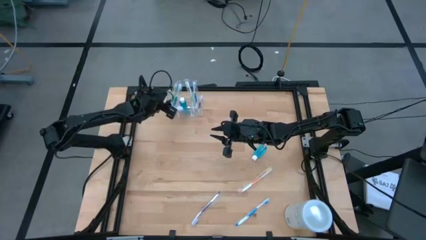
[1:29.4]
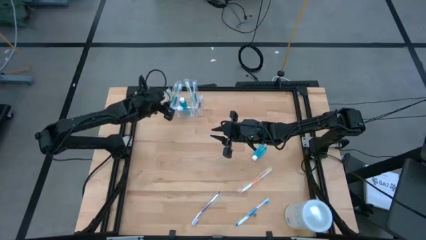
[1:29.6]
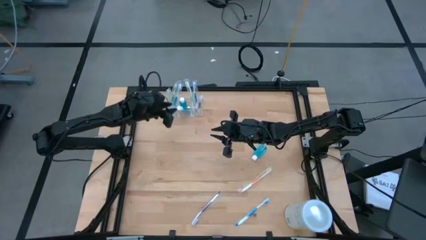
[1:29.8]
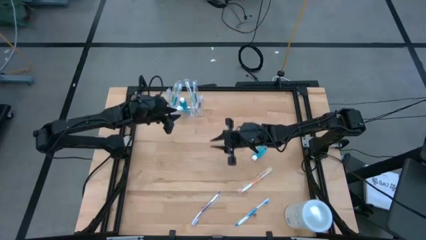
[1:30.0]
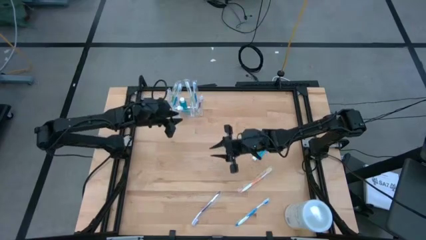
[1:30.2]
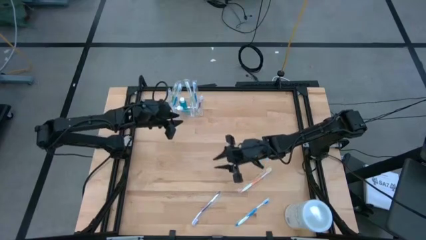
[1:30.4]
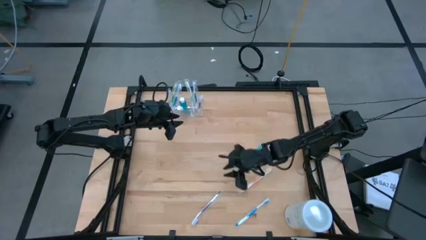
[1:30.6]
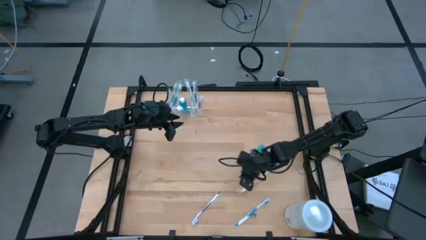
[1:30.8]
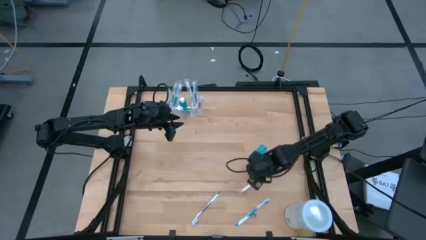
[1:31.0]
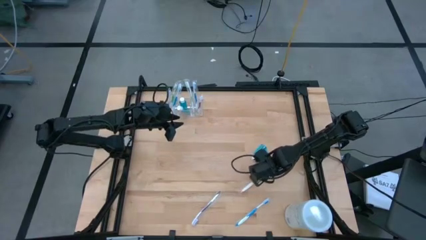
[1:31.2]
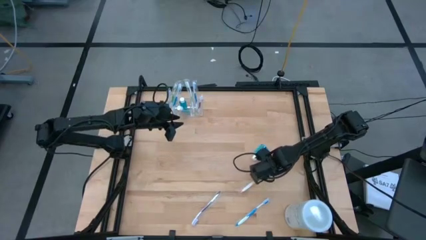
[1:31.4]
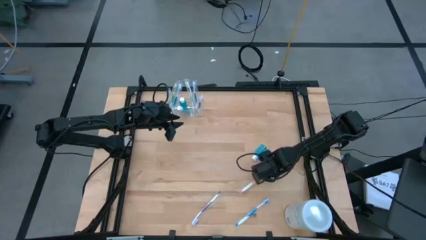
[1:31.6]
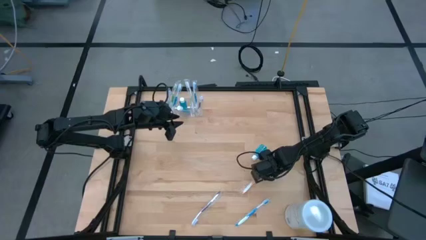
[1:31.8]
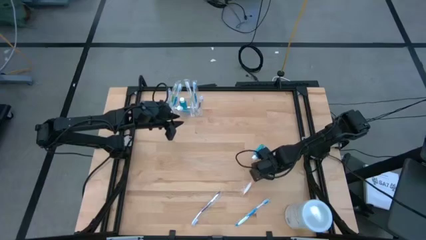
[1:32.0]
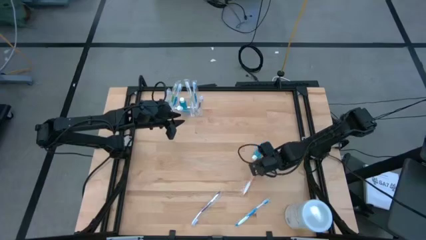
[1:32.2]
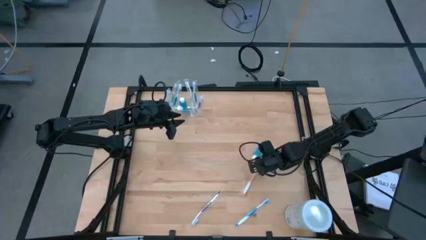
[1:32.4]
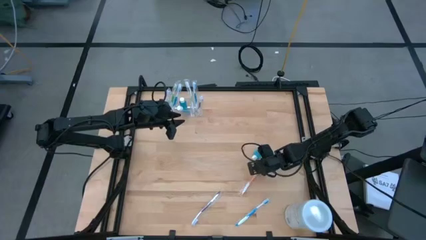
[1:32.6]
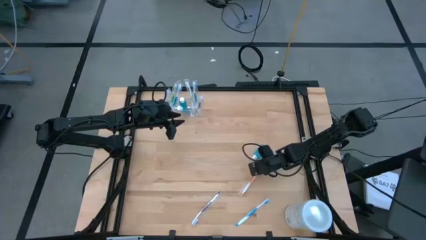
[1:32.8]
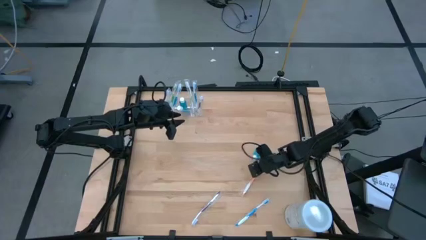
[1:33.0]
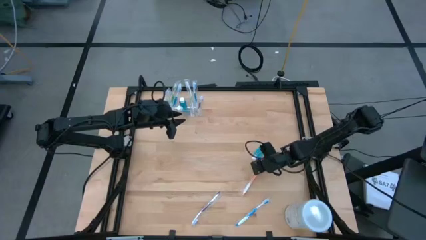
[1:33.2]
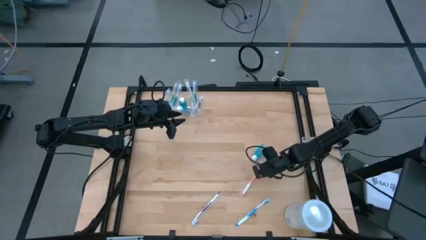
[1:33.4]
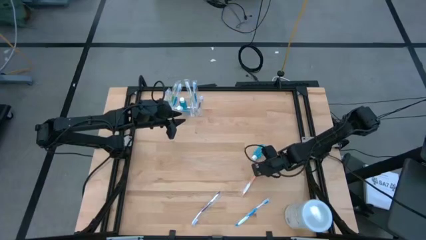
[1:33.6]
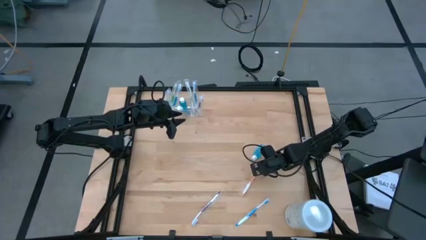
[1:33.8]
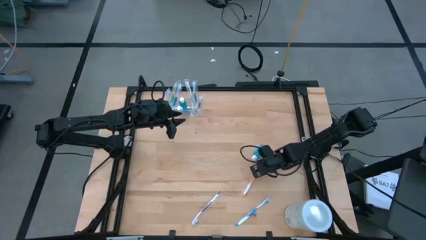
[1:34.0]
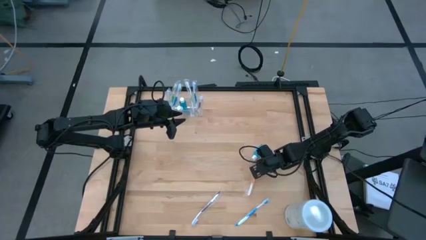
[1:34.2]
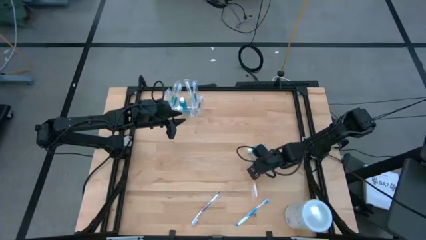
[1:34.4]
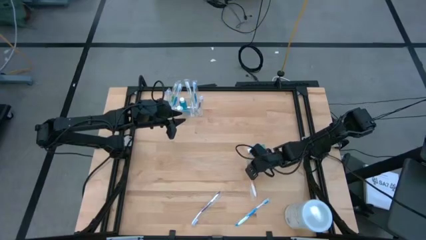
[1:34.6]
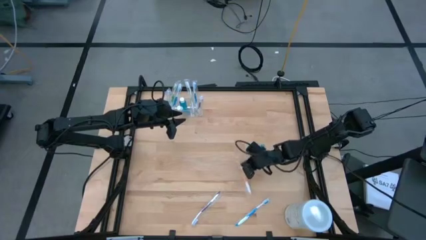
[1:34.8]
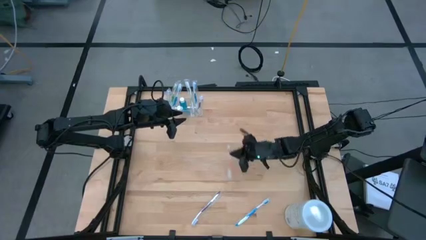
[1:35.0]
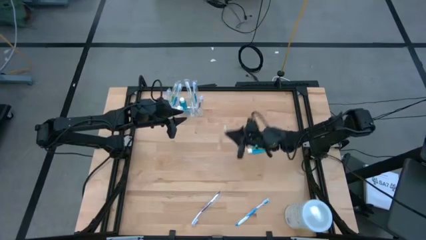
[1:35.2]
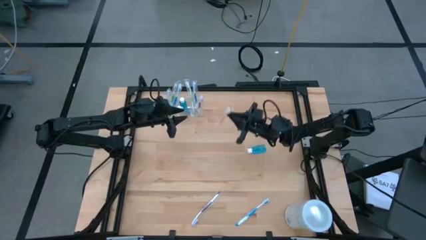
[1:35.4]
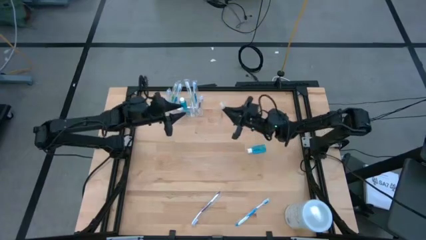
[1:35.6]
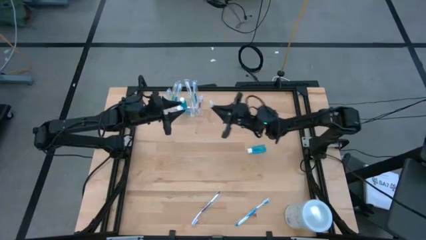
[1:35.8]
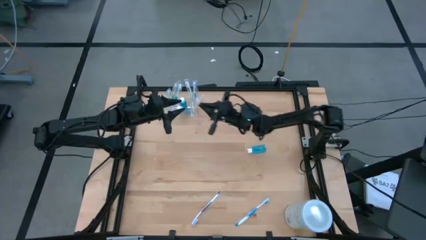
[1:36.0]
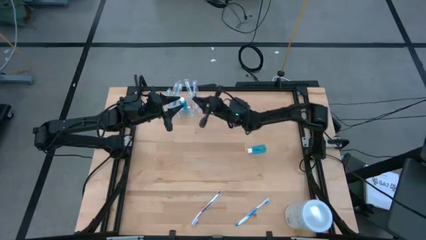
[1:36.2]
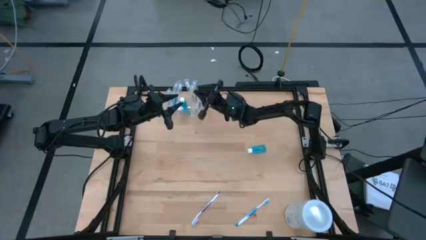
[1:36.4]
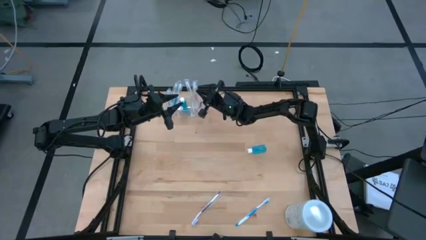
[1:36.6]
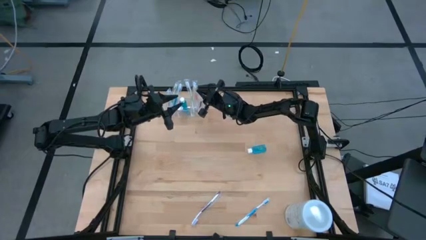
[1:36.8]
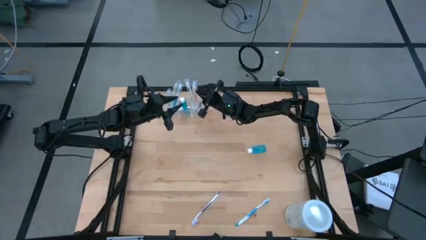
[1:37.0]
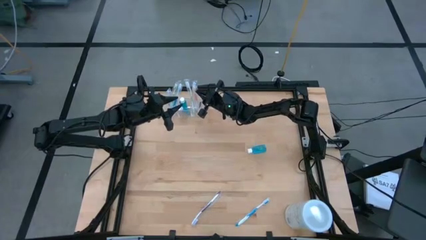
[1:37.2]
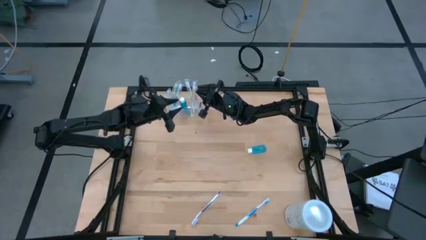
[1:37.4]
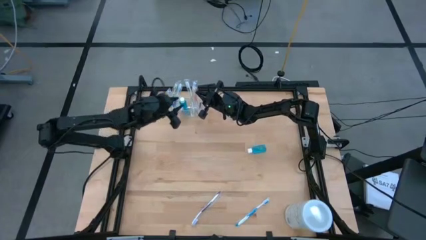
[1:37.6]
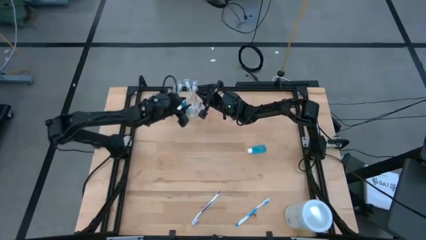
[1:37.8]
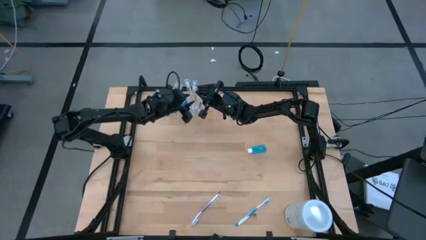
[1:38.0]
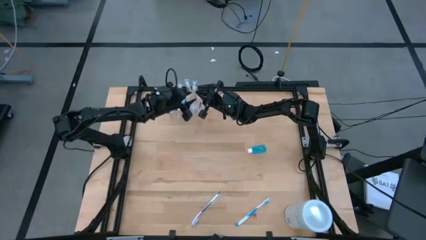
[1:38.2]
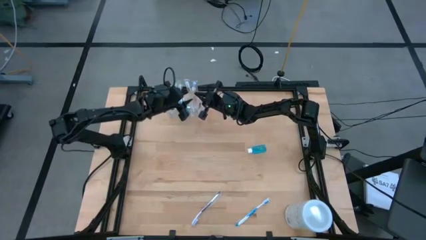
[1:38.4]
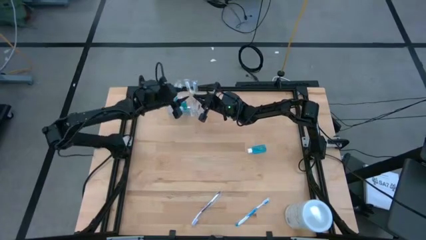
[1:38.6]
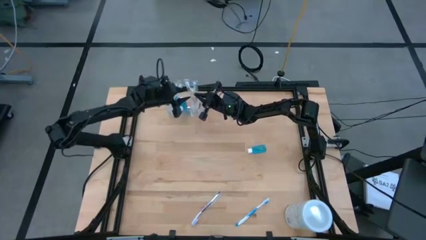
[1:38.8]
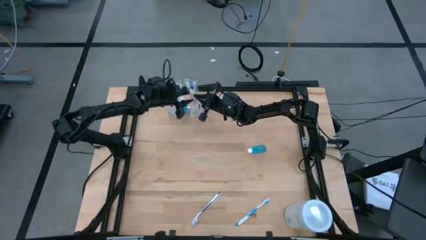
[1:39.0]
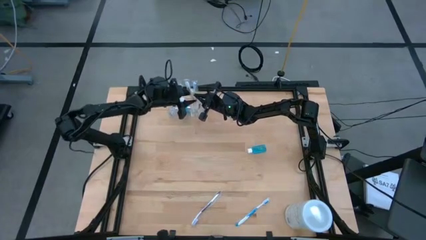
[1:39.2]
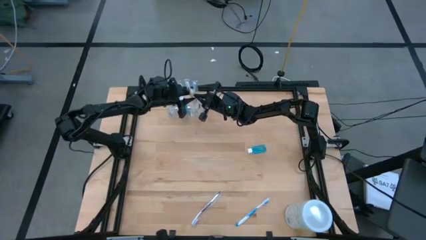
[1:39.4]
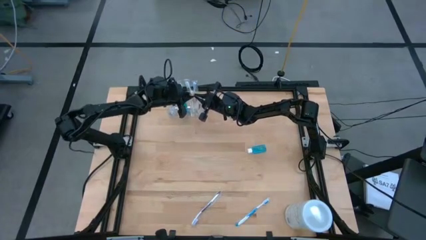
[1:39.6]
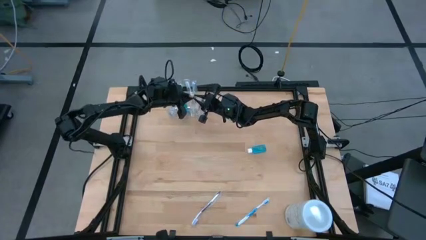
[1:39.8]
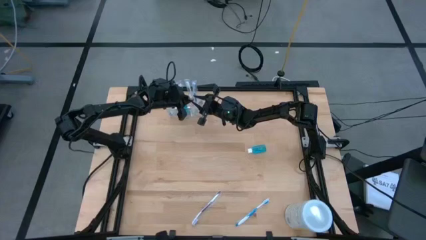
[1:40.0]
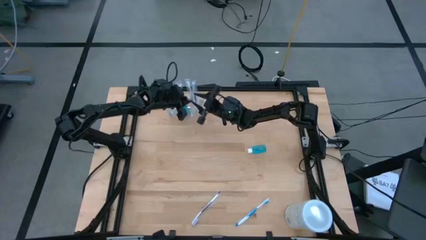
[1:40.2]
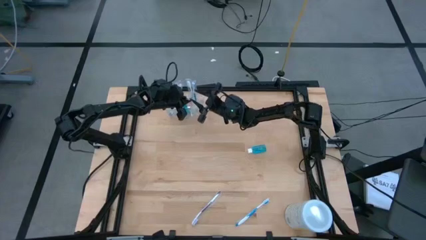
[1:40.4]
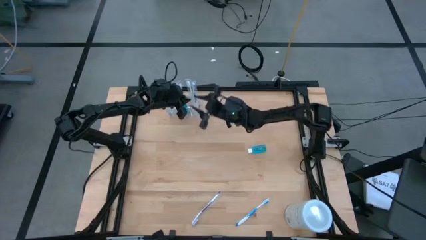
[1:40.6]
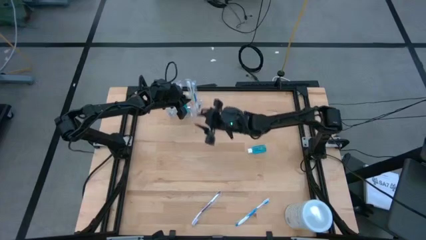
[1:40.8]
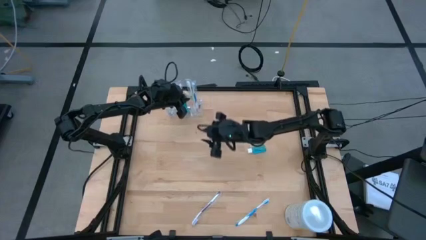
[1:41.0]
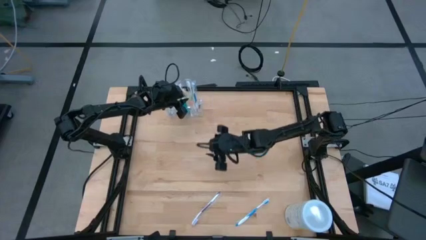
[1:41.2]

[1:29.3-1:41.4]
Task: Pick & Place toothbrushing station
Put the orange toothbrush into the transparent organizer

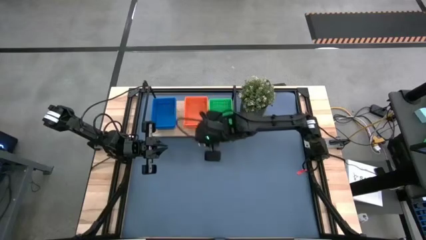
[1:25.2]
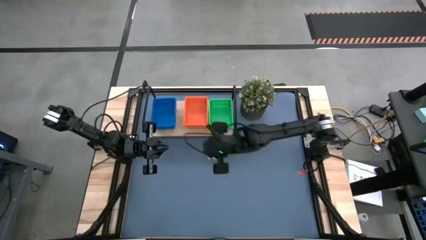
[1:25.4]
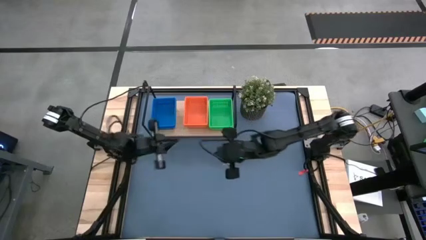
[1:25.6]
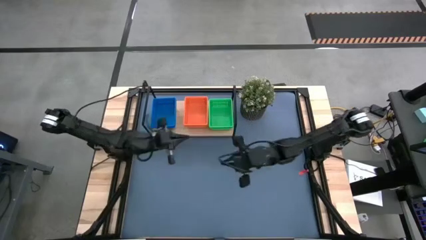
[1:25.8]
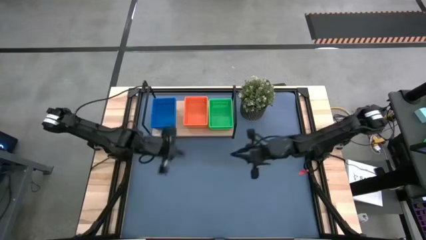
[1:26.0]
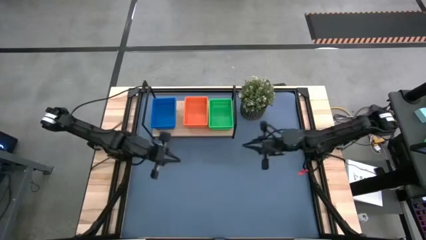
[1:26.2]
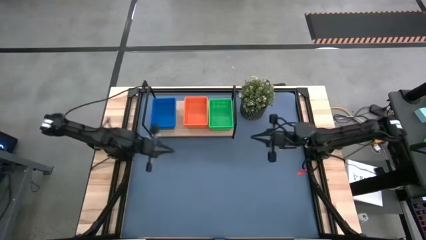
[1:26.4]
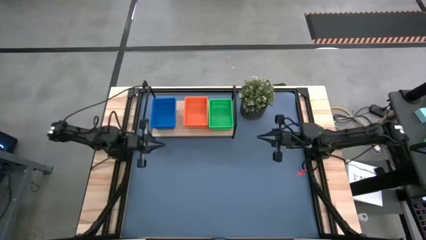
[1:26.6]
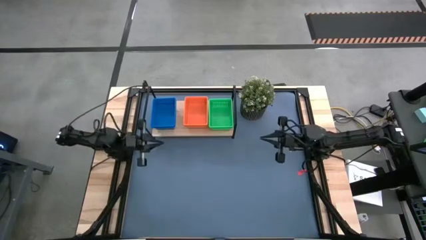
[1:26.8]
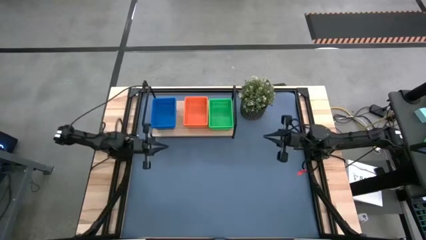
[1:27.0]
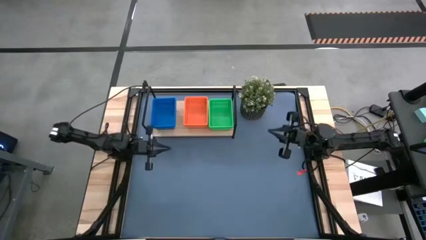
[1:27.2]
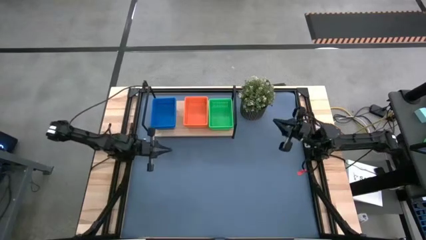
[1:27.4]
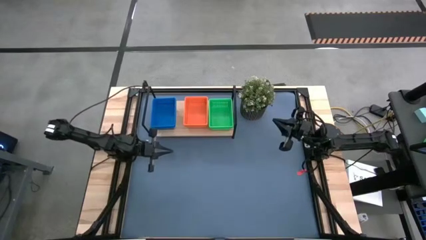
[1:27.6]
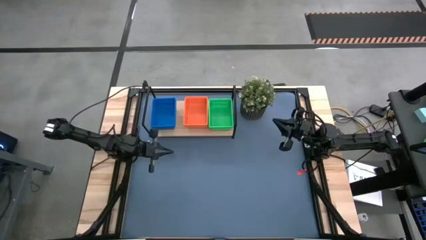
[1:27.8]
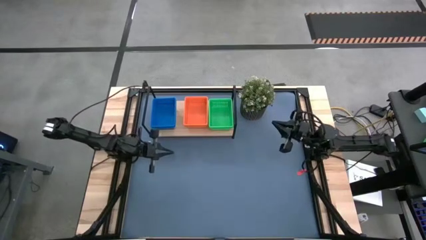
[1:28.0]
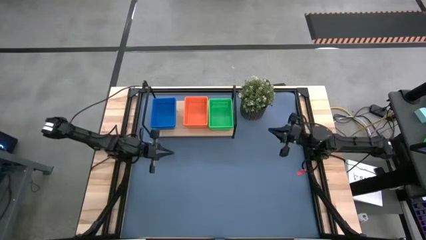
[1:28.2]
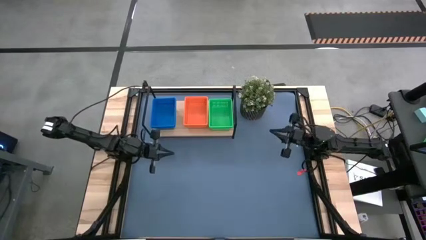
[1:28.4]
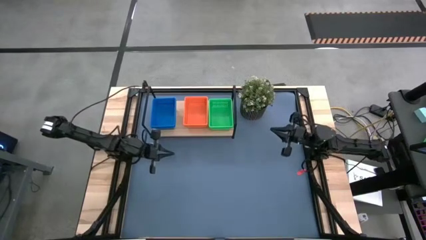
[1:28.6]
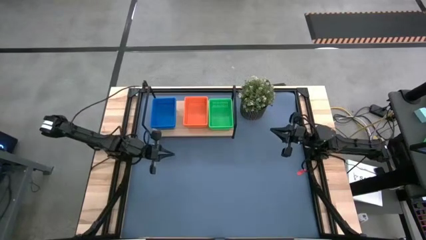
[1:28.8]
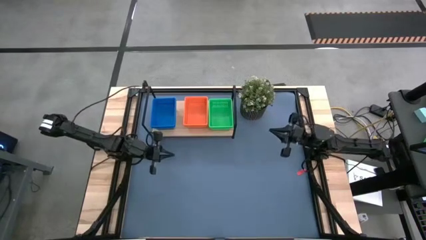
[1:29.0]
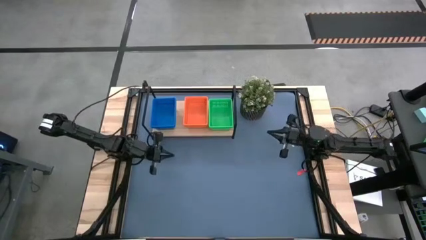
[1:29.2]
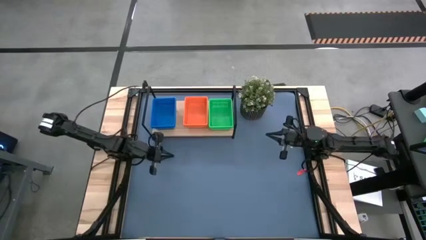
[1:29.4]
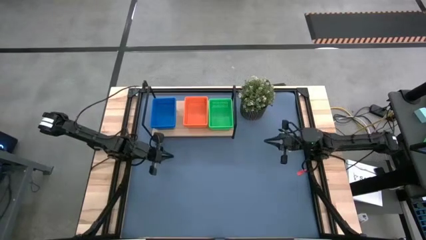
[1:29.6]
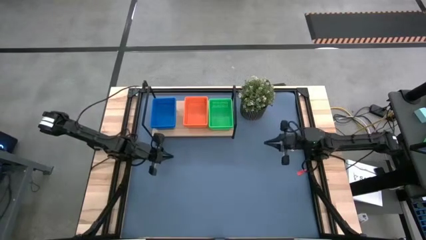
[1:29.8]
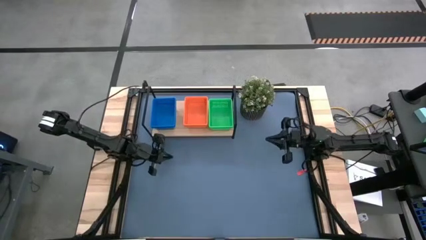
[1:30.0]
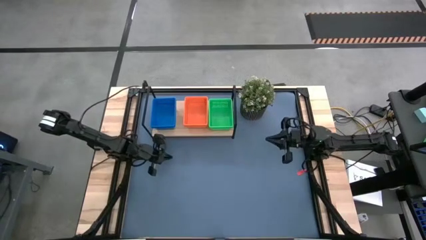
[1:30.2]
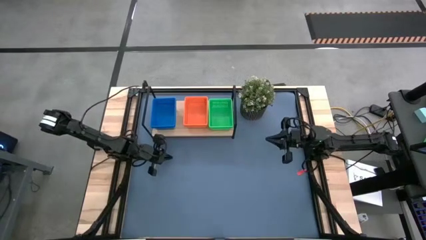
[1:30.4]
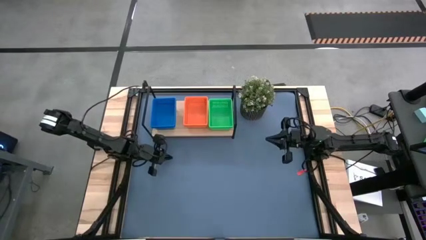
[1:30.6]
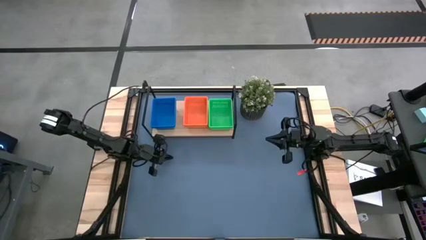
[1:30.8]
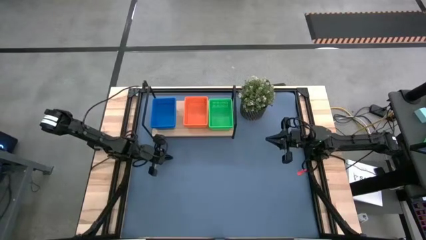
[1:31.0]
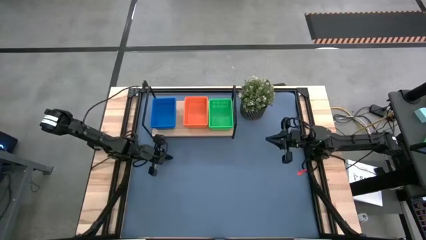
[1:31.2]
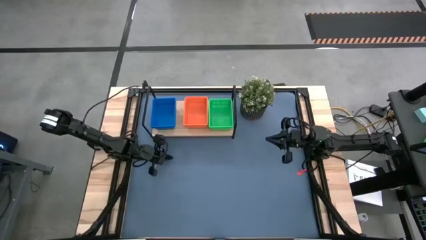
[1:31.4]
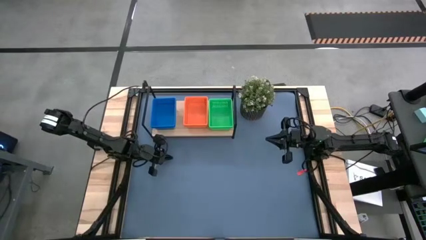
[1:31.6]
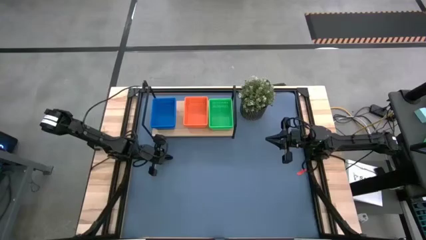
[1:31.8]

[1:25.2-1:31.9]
Task: Stack baskets on shelf by color
Return to Home Position
